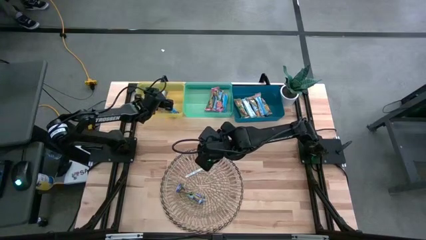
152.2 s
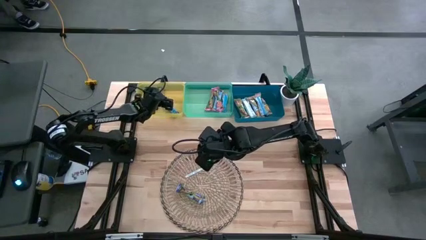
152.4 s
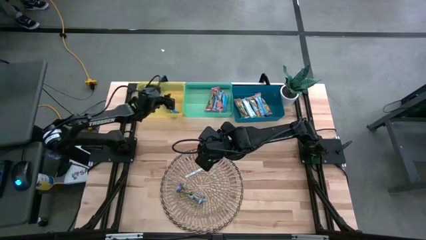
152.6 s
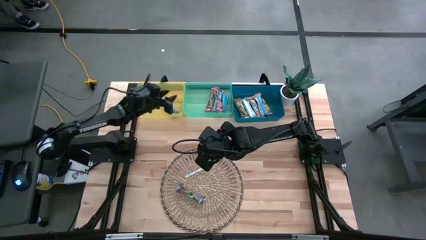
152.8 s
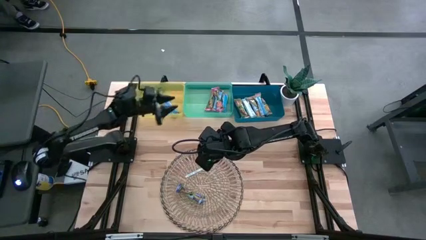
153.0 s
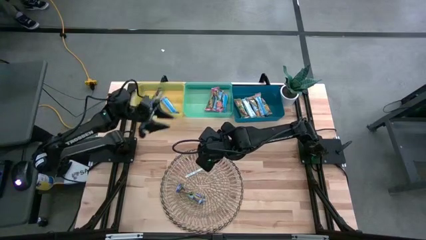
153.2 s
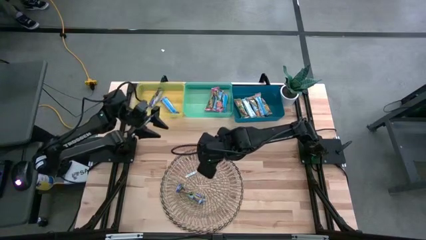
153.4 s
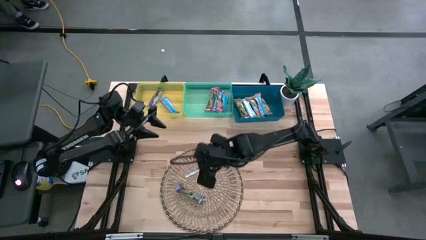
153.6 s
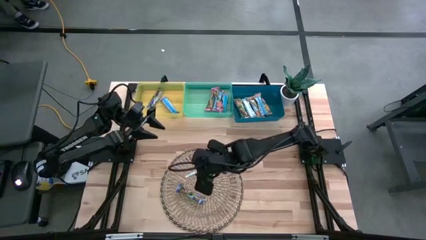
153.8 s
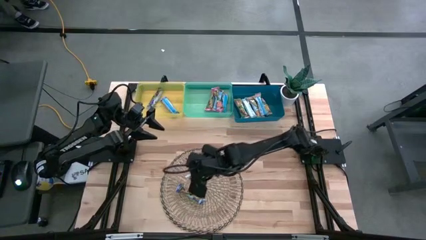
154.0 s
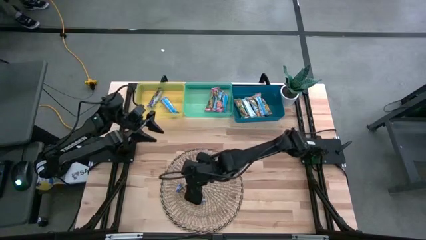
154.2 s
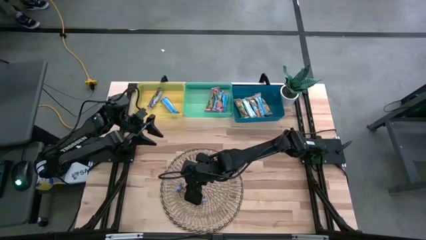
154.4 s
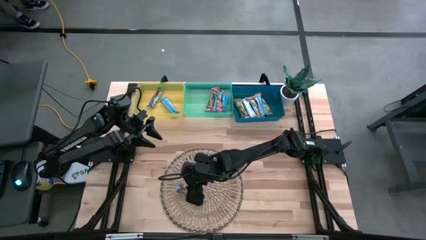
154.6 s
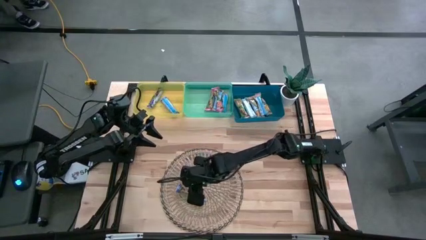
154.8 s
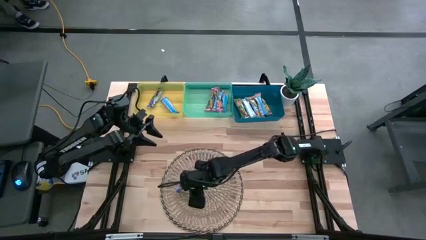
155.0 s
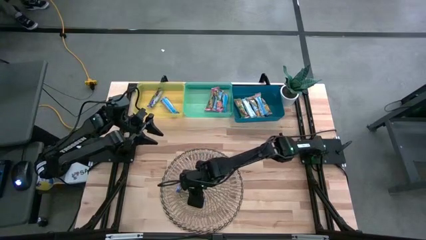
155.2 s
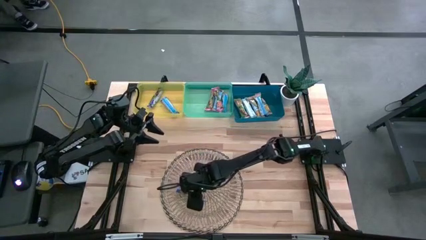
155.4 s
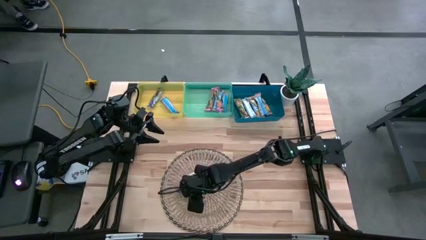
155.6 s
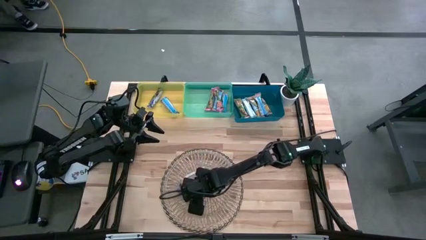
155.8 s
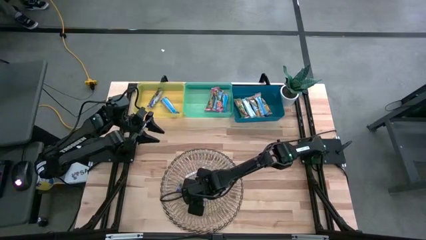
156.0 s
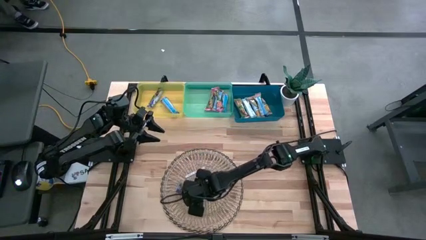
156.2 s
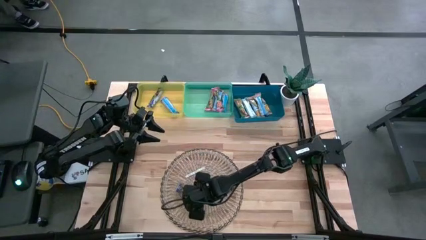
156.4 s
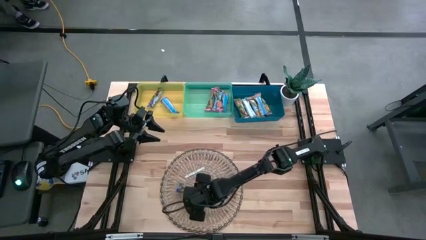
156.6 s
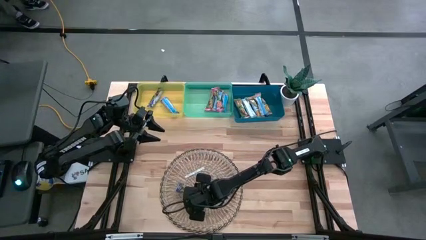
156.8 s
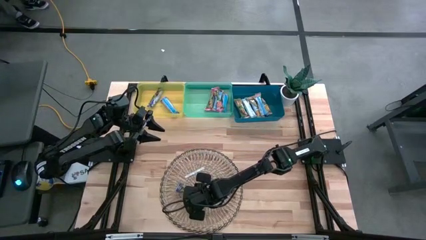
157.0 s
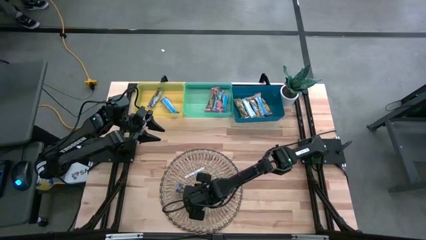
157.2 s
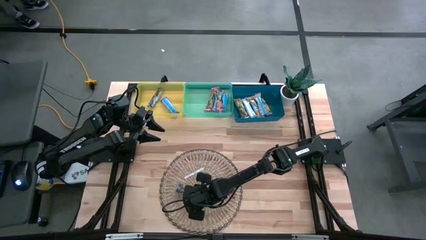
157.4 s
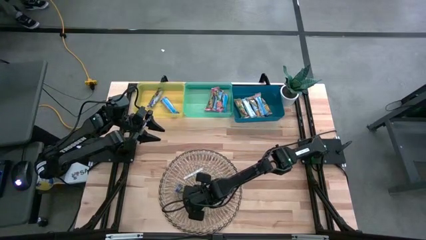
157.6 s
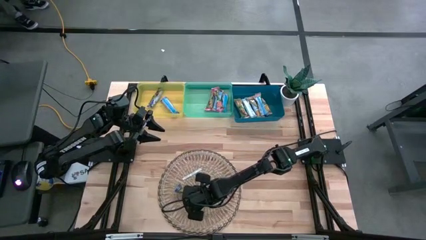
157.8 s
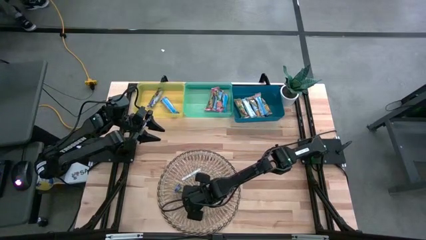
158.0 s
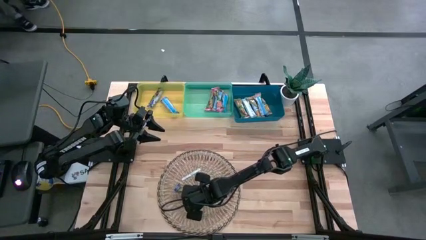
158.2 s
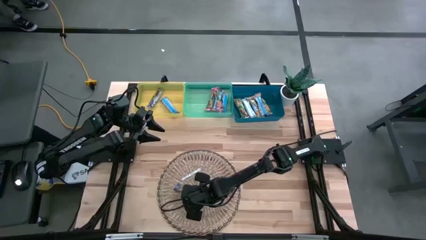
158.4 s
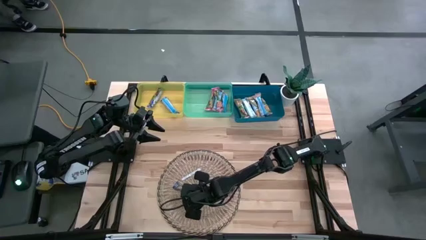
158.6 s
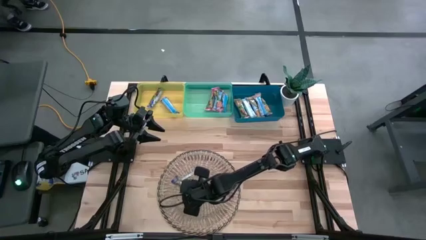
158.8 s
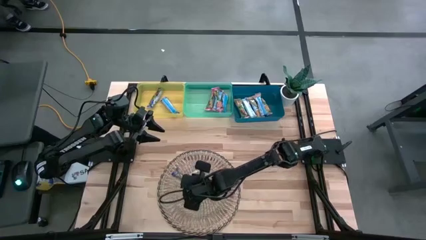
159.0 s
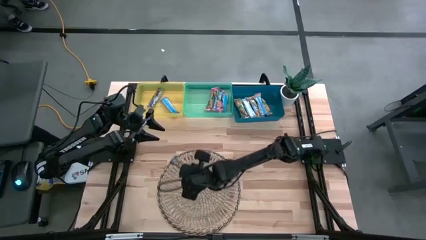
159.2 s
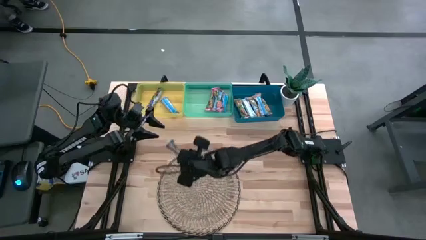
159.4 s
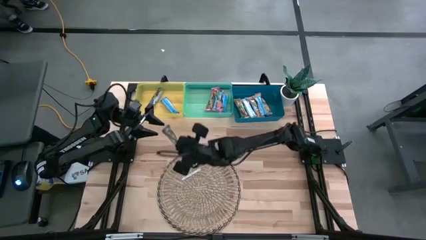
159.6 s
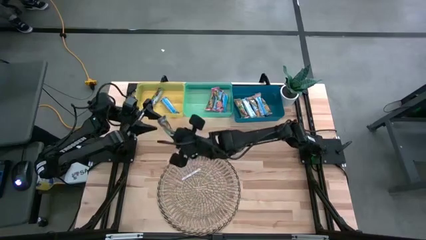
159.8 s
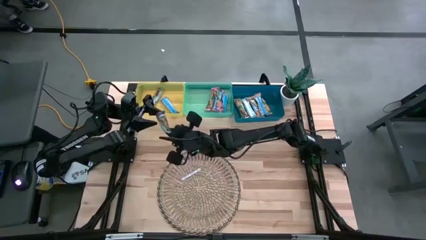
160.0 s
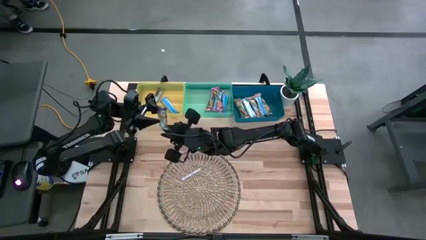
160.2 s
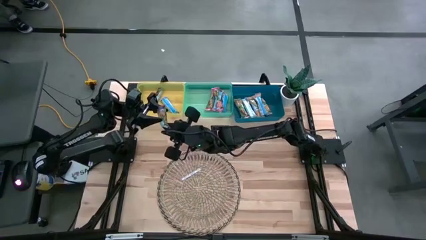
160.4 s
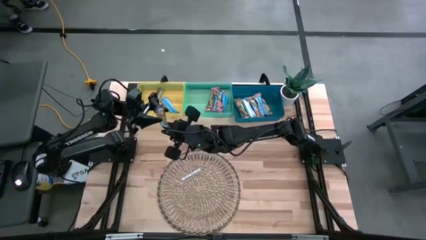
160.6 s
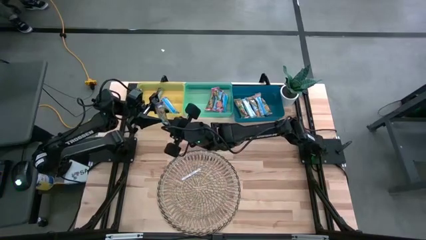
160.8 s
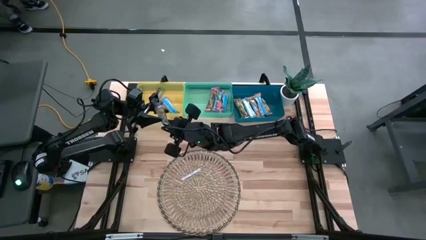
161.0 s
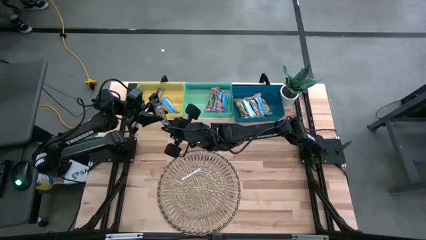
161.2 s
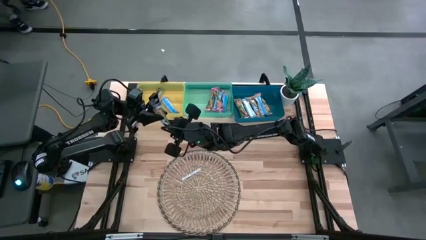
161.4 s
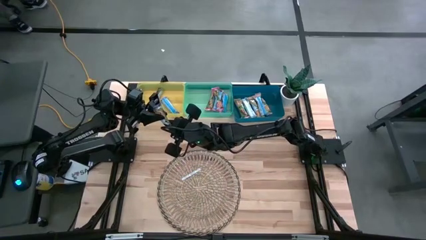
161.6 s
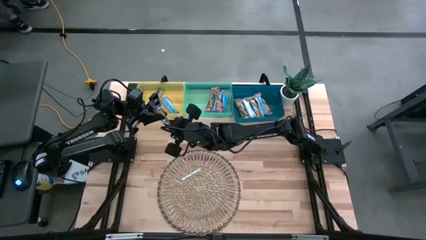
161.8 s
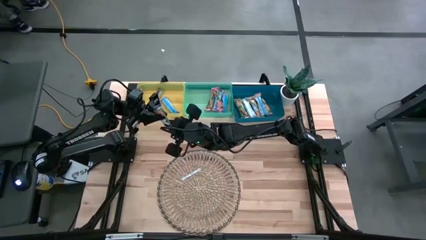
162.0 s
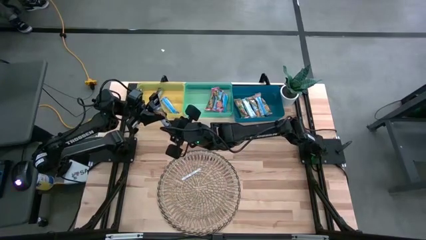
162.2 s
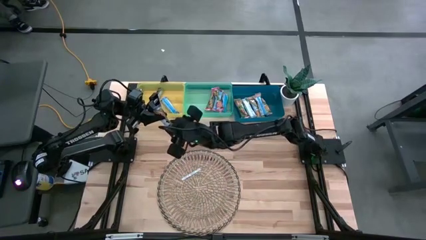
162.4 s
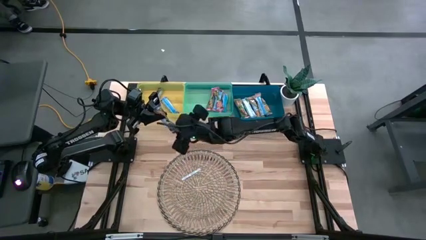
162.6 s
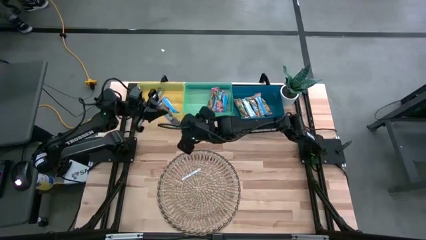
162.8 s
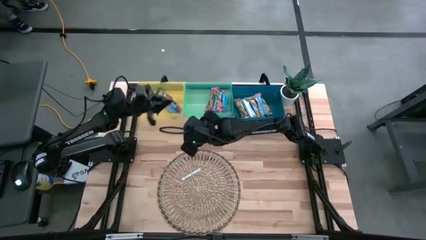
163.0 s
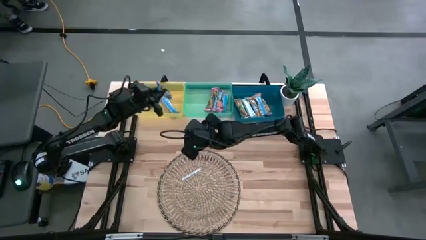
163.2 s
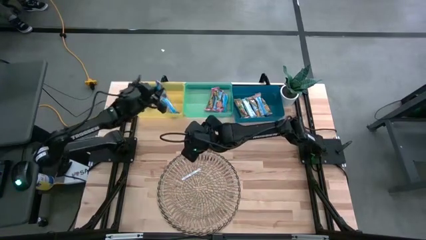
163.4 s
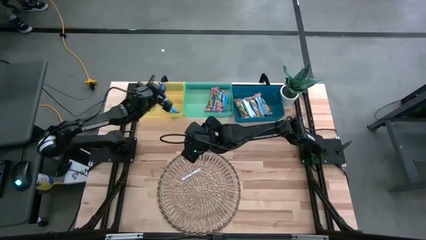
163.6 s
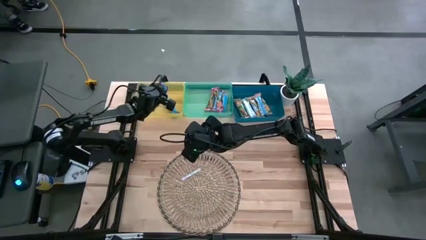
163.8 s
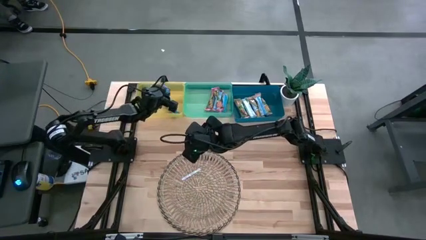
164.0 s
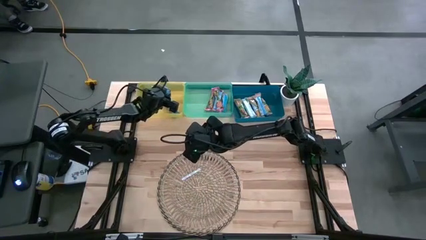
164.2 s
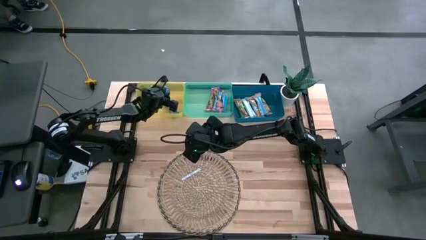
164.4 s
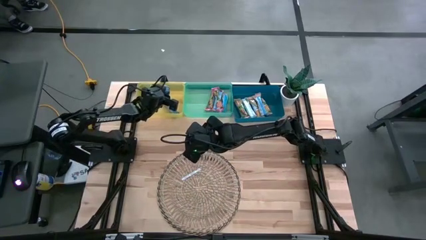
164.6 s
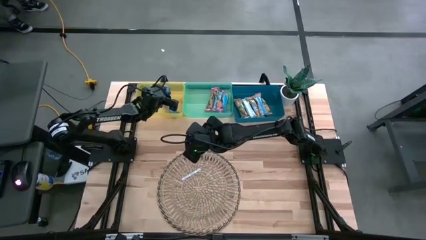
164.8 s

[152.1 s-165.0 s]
Task: Pick and place Granola Bars by type
Put the blue granola bar into the yellow bin
